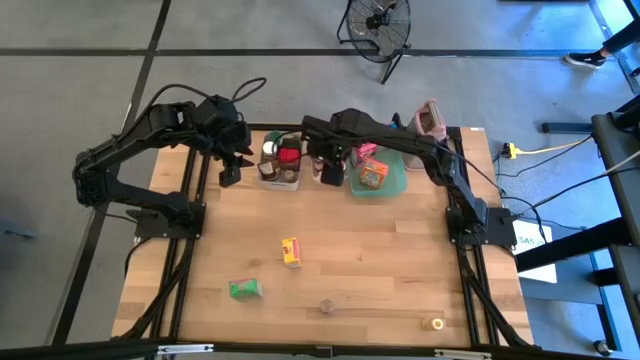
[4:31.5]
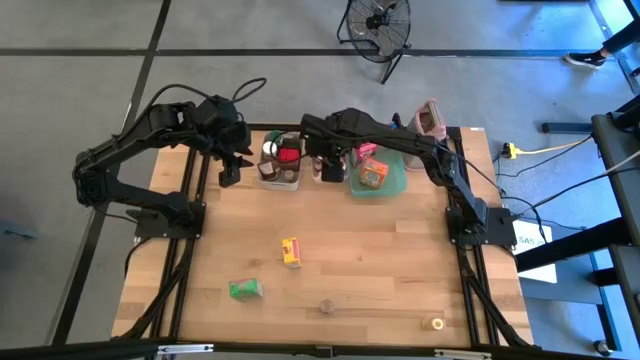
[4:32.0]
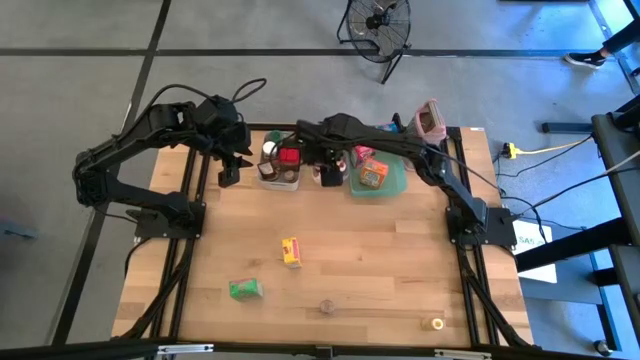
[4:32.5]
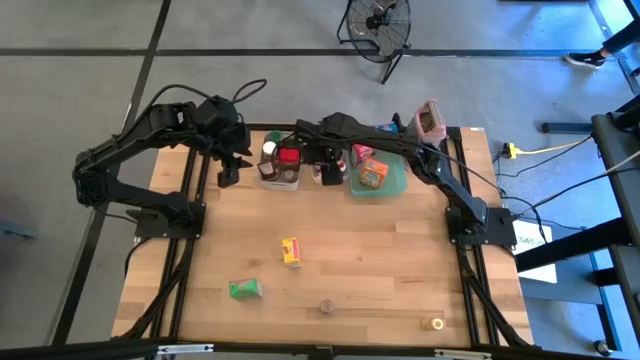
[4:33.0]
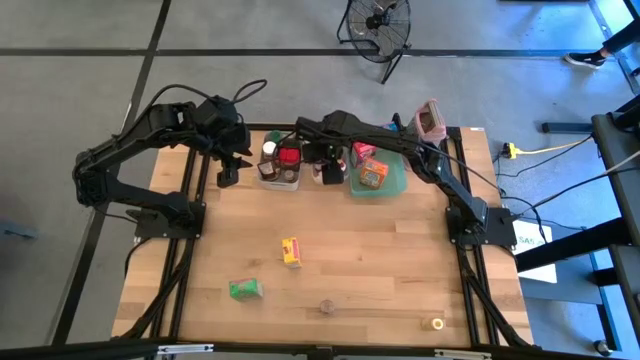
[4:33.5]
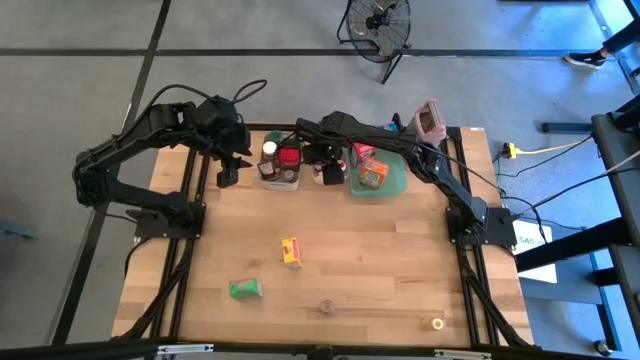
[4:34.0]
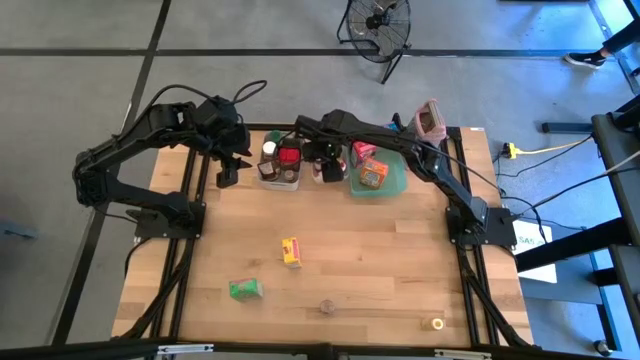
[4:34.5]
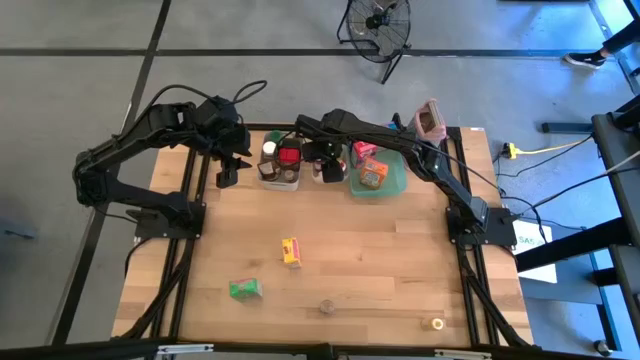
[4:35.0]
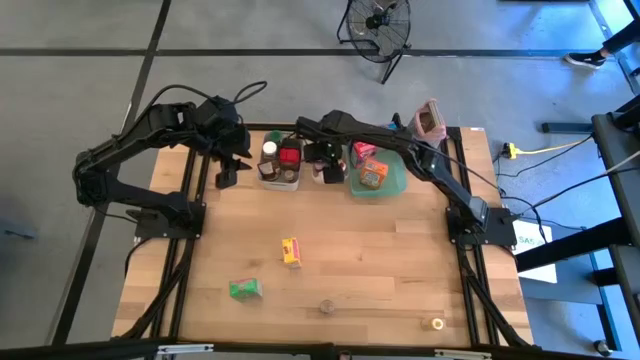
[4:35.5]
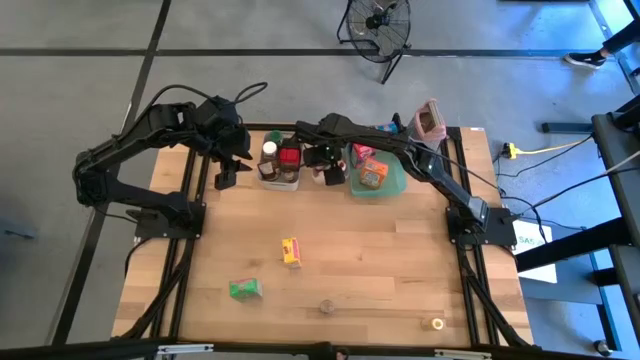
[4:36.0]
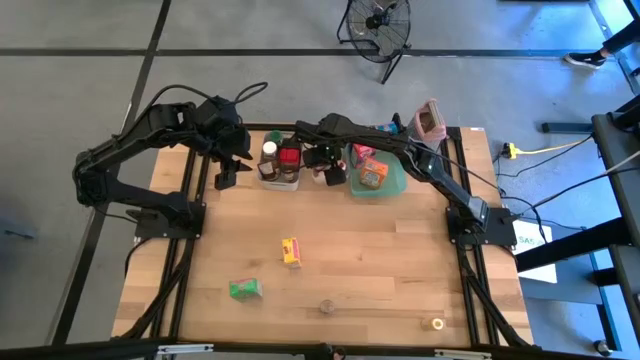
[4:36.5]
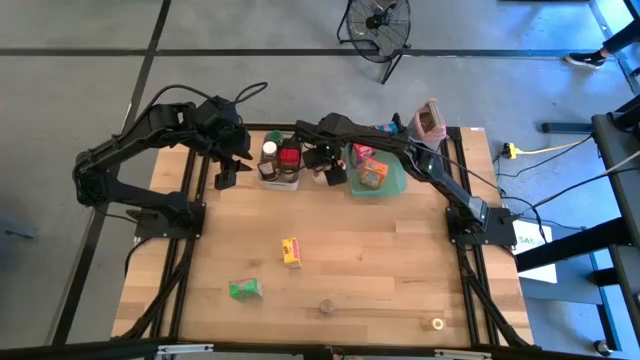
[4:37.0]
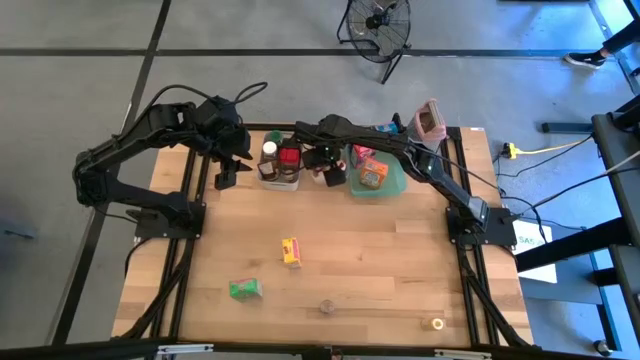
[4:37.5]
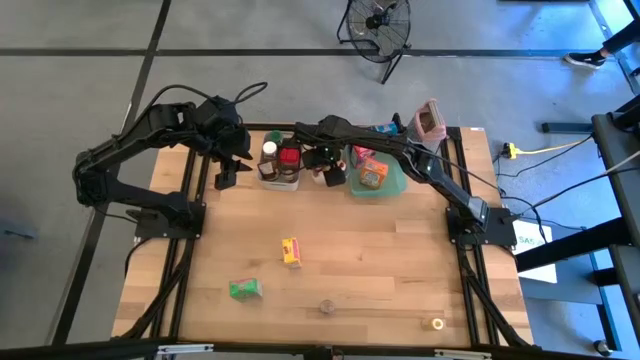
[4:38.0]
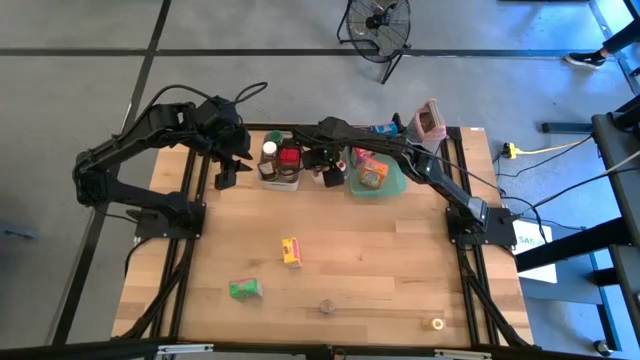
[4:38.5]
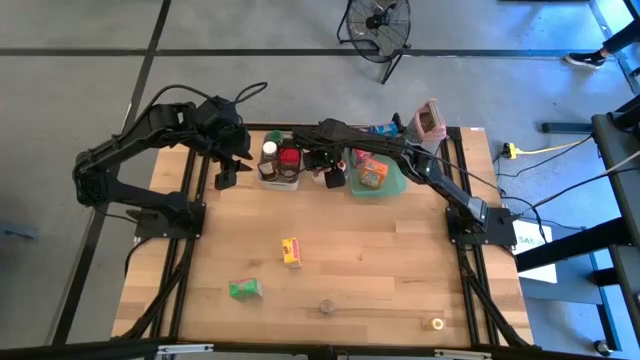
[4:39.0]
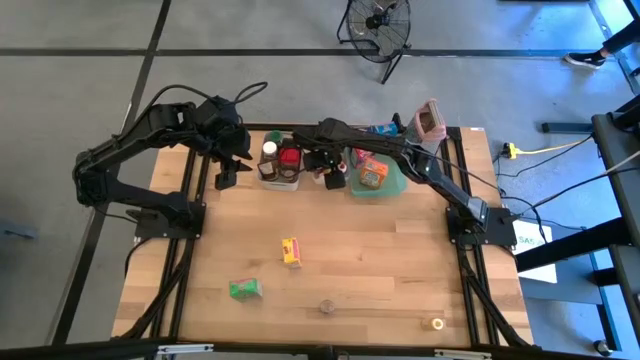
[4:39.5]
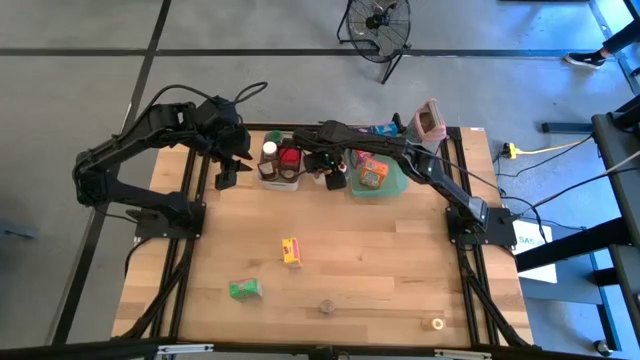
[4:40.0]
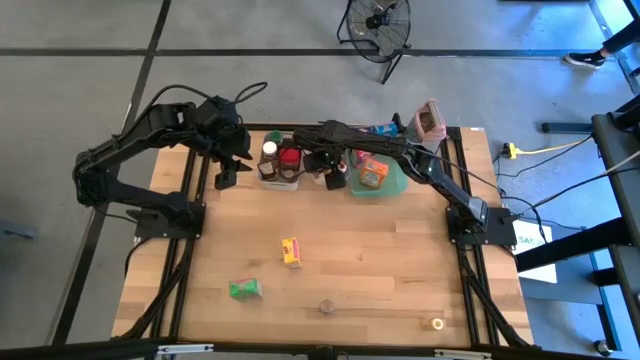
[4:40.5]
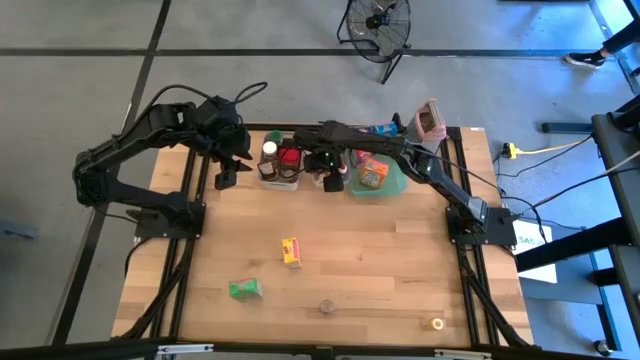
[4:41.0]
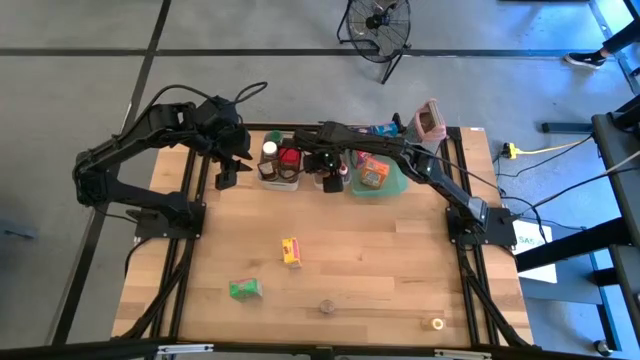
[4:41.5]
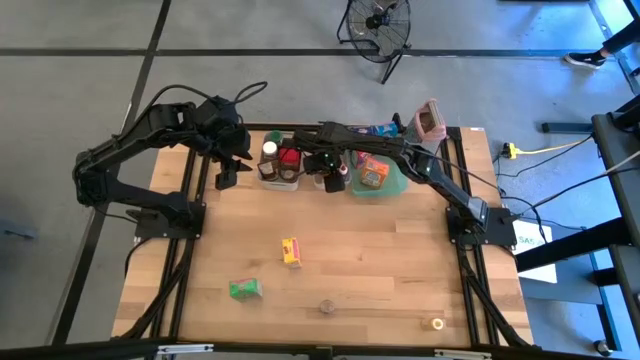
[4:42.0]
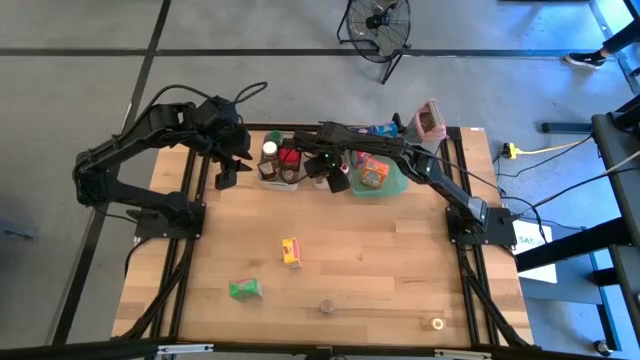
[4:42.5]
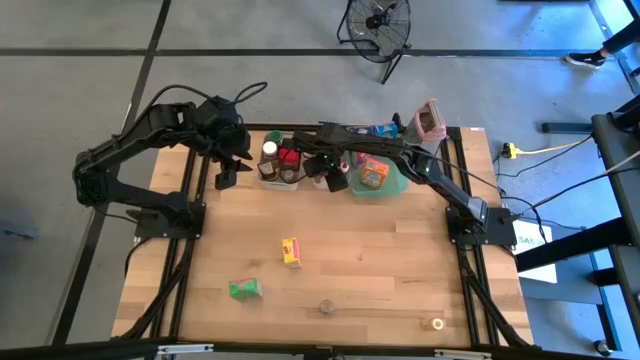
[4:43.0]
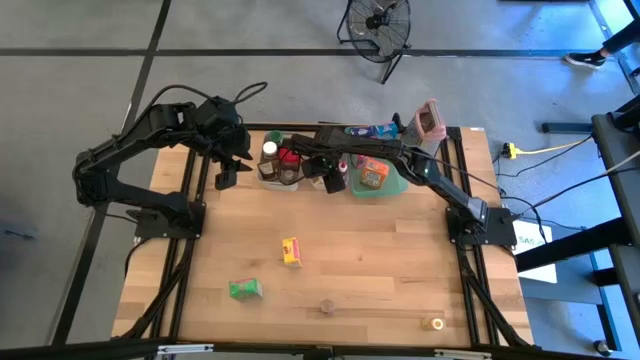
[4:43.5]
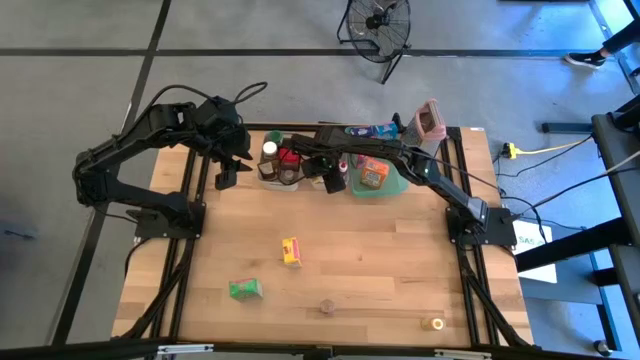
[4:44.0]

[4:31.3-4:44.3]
Task: Pick & Place Kitchen Items
Adjust the yellow food coloring bottle in the transparent bin

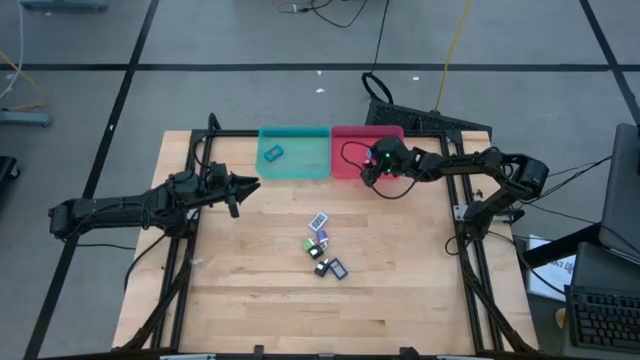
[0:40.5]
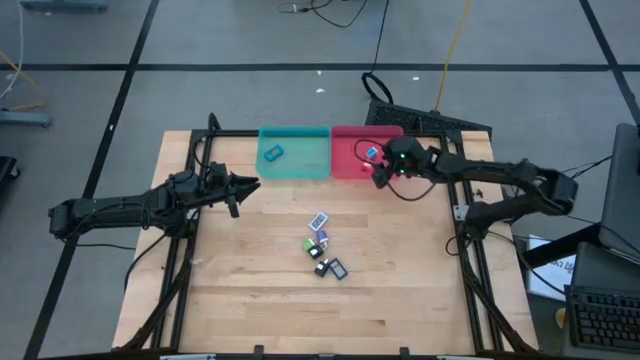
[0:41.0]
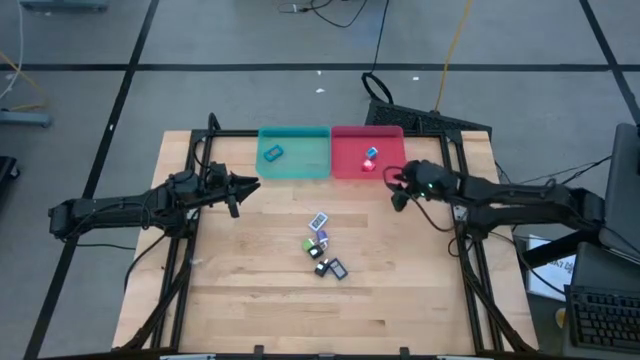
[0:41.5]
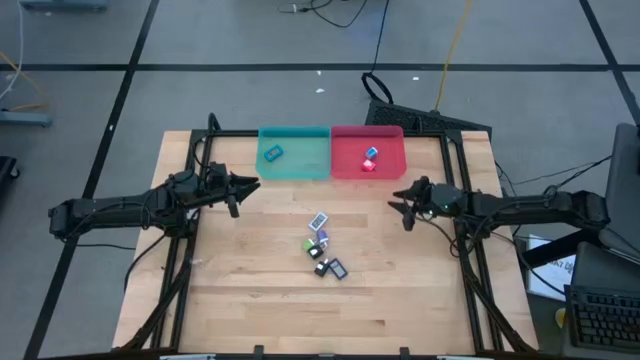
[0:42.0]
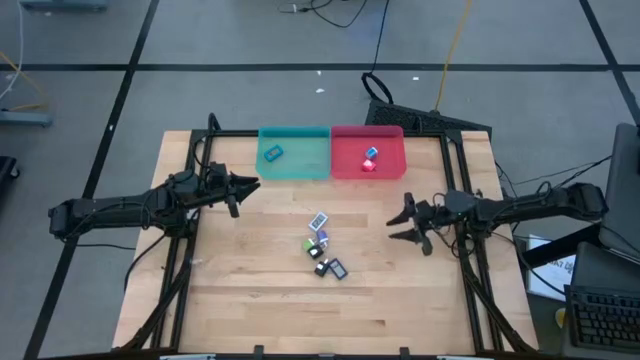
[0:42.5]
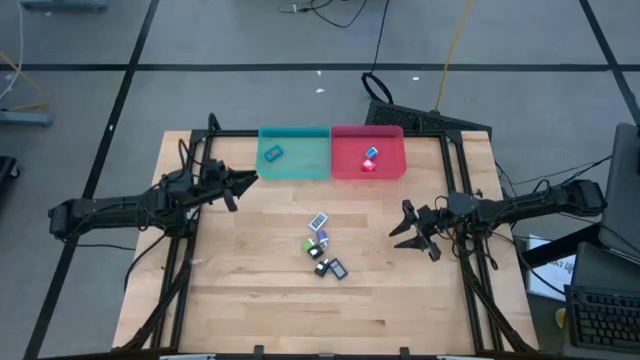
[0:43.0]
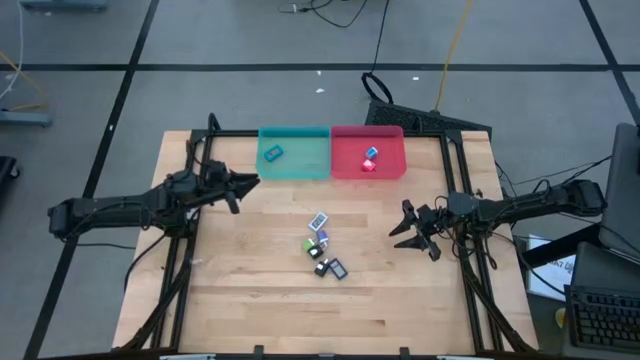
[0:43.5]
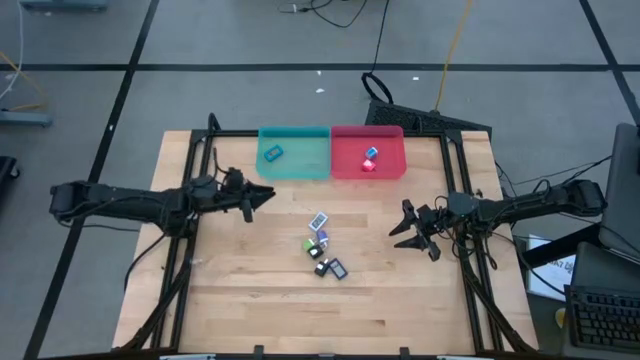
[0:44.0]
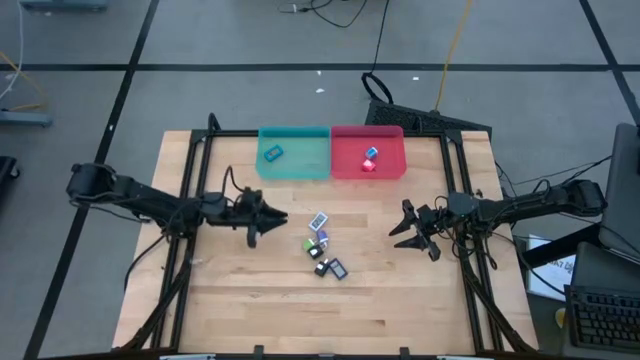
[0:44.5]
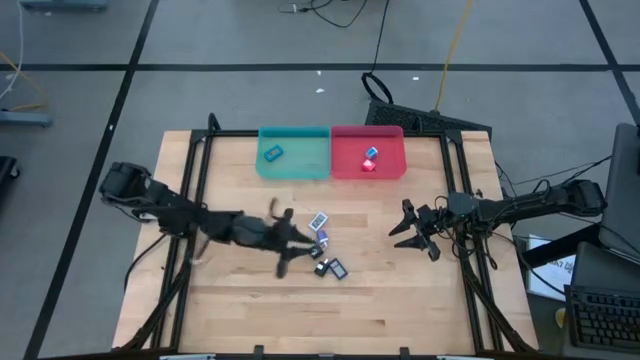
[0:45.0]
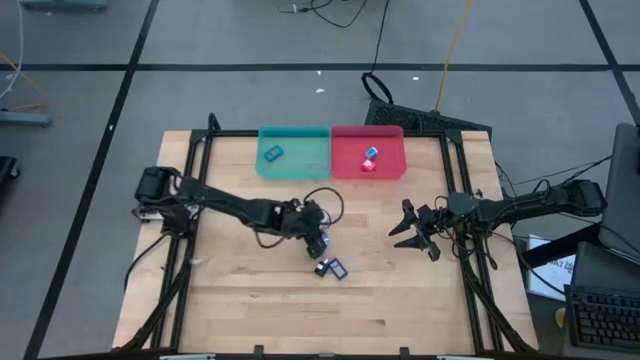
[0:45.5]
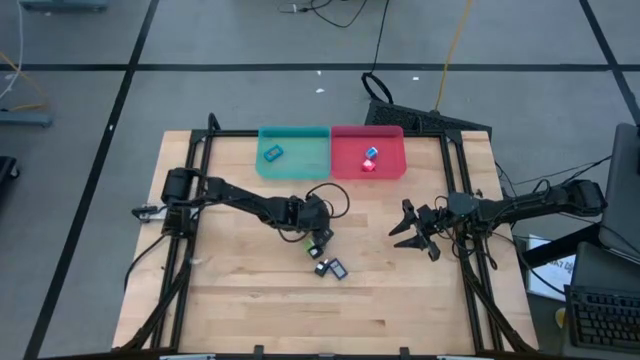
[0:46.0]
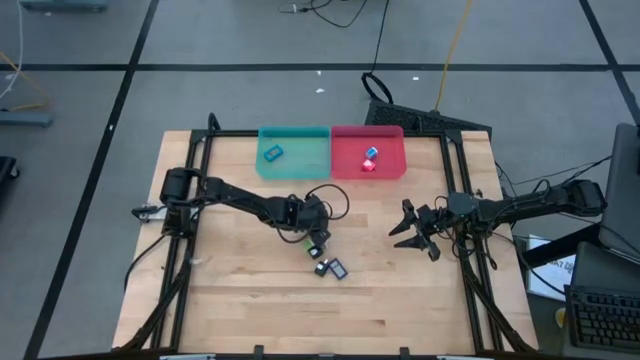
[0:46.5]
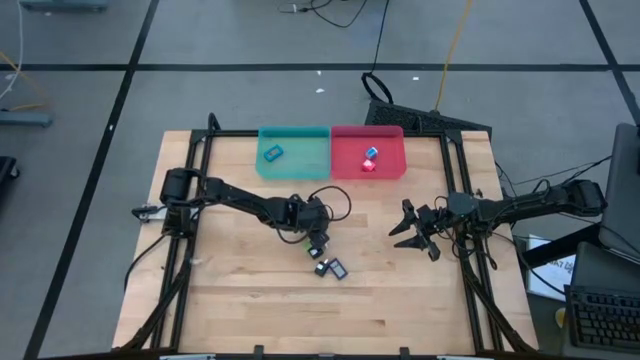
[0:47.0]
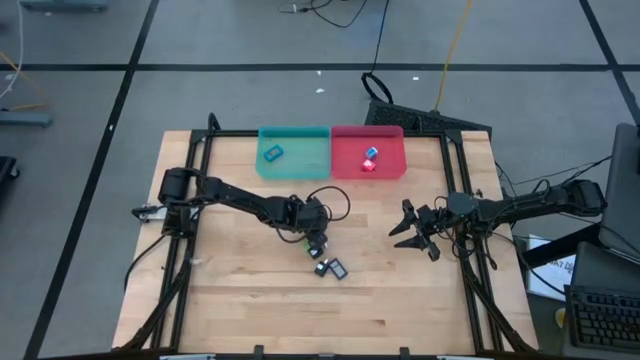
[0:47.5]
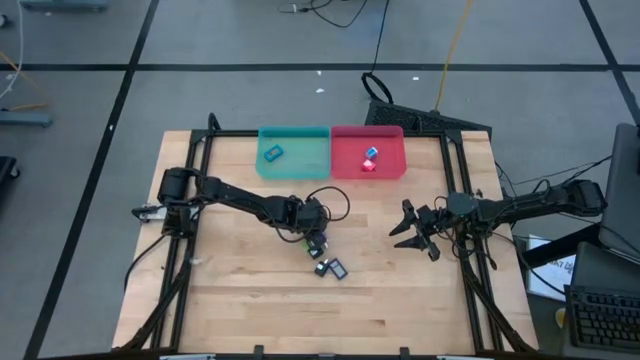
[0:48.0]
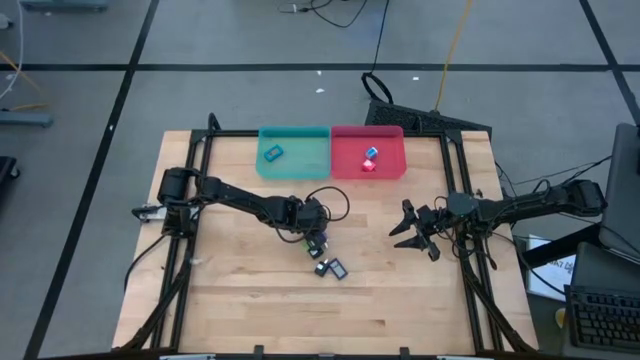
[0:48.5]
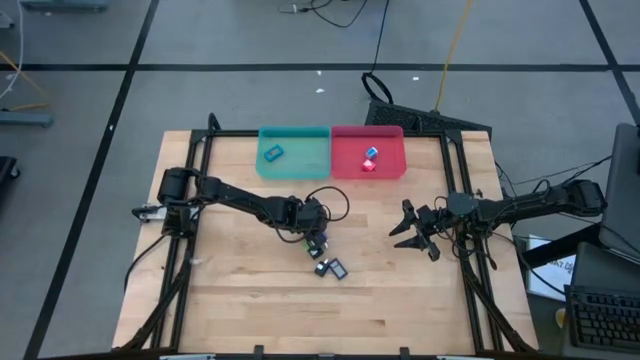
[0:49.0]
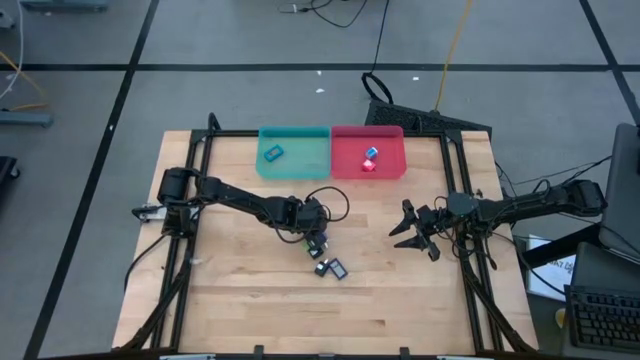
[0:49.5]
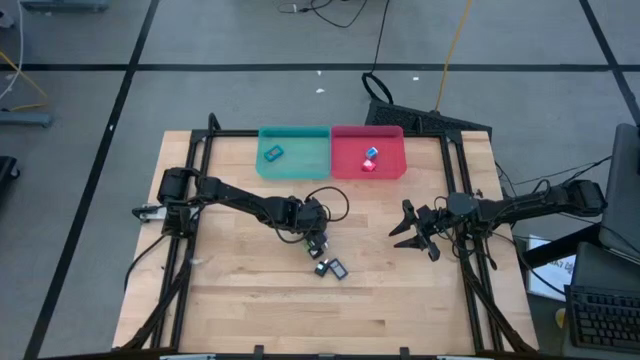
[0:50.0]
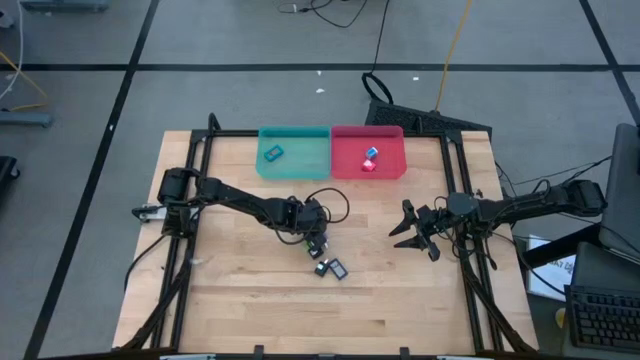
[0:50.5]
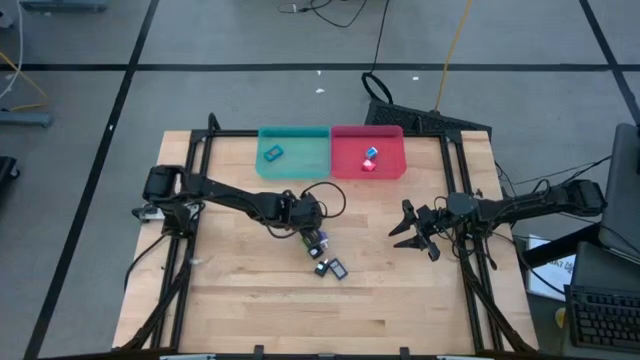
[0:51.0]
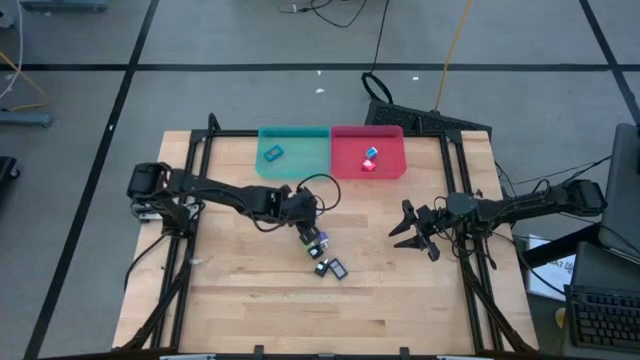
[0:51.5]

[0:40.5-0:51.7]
Task: Sort charging adapters and watches
Put the white watch in the blue bin
